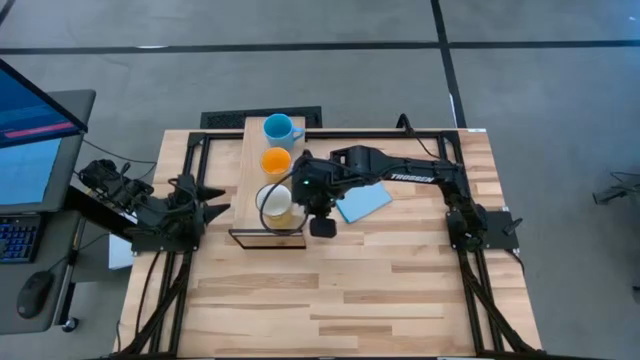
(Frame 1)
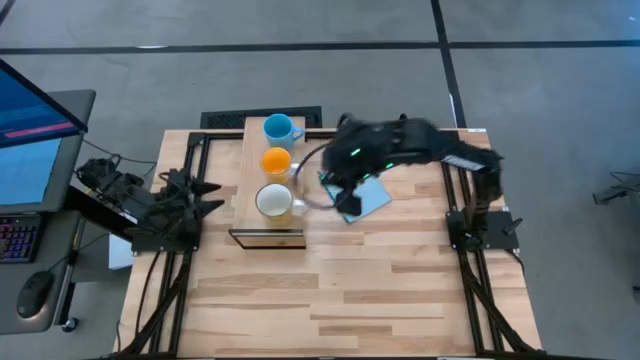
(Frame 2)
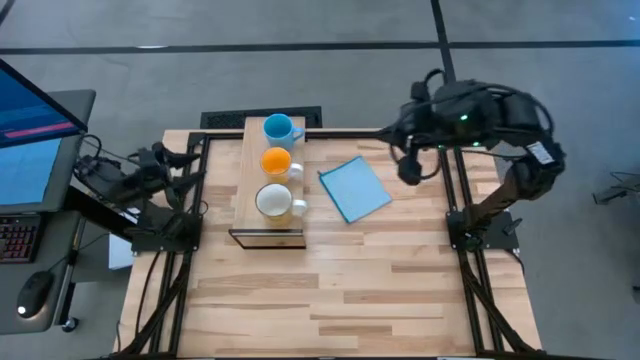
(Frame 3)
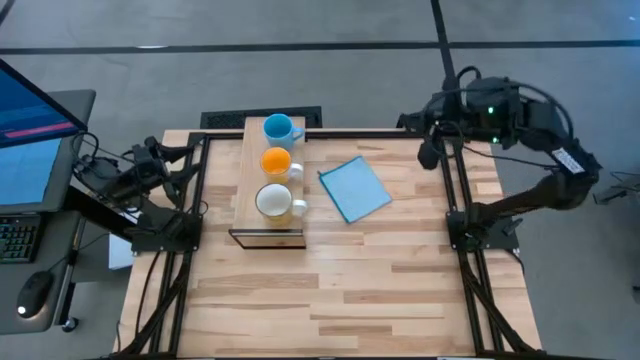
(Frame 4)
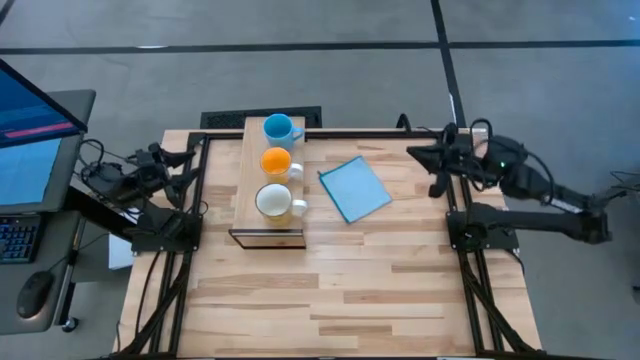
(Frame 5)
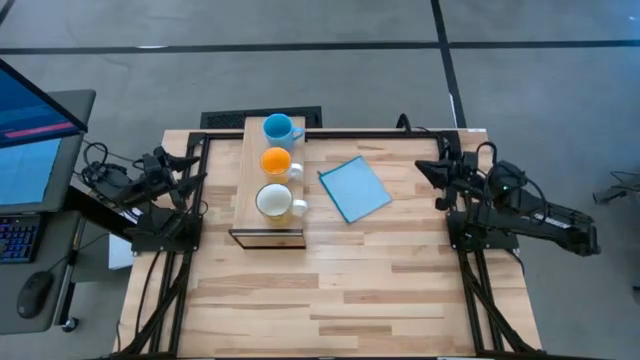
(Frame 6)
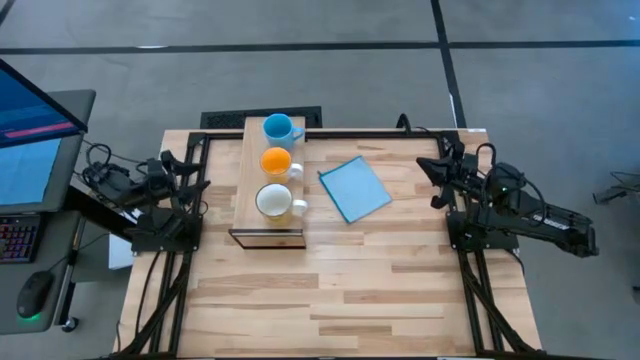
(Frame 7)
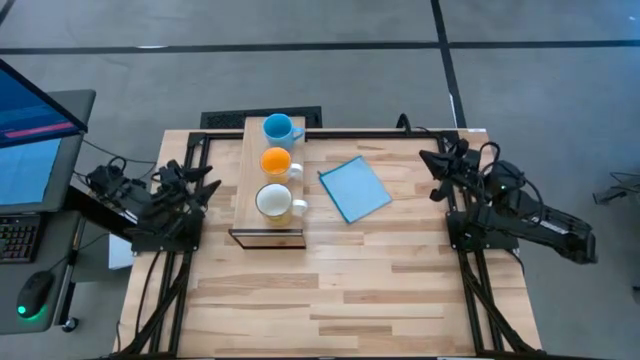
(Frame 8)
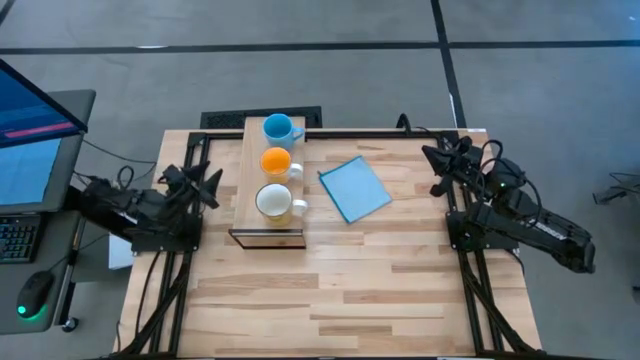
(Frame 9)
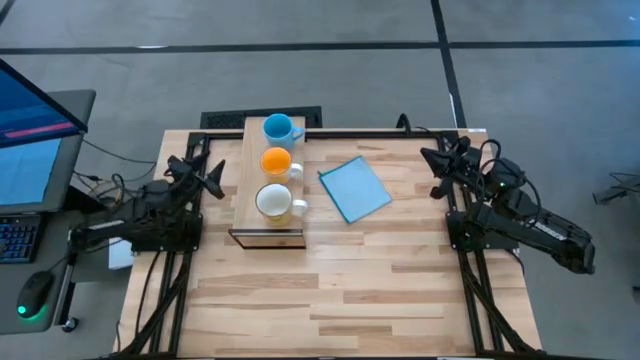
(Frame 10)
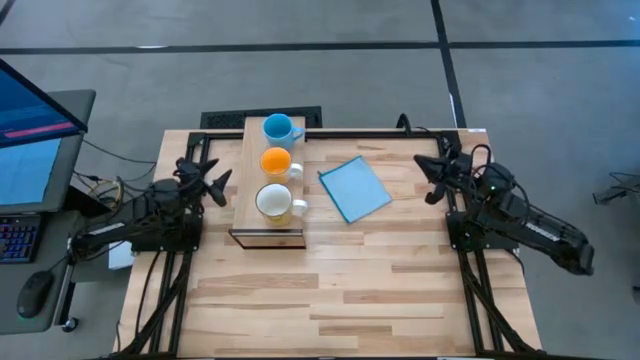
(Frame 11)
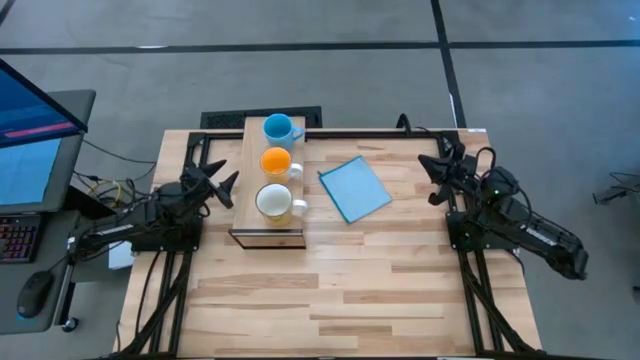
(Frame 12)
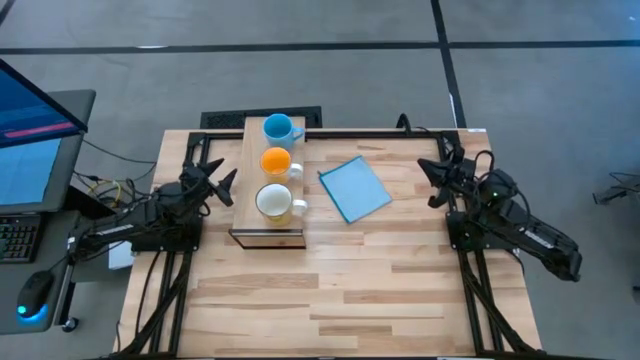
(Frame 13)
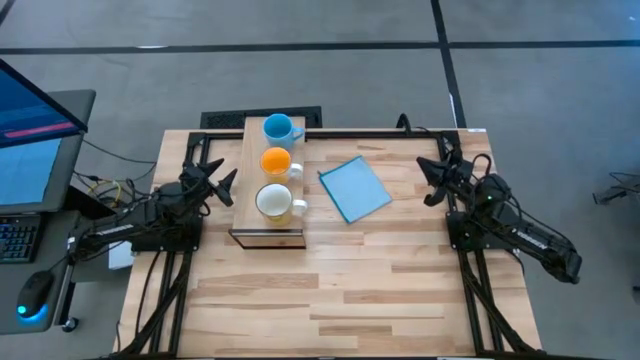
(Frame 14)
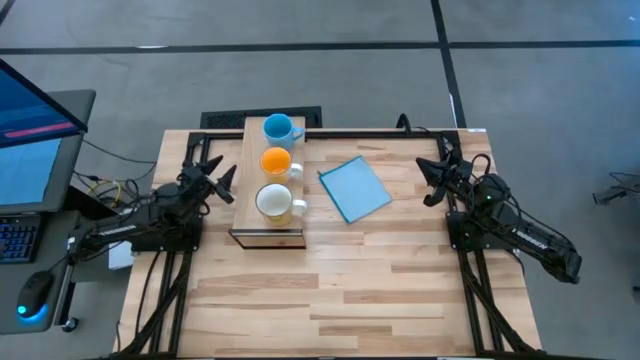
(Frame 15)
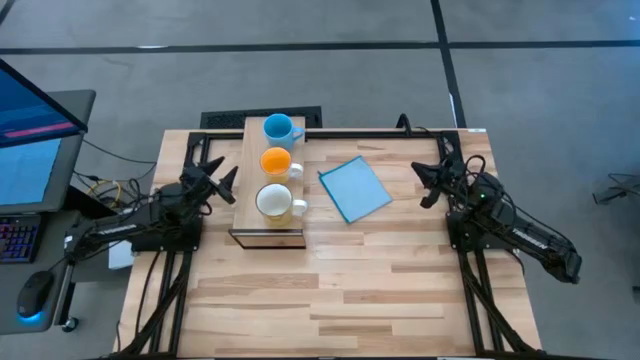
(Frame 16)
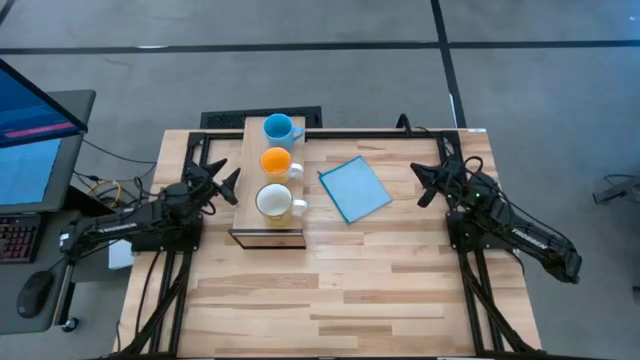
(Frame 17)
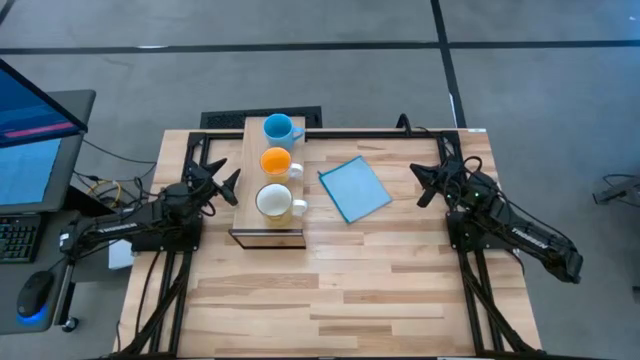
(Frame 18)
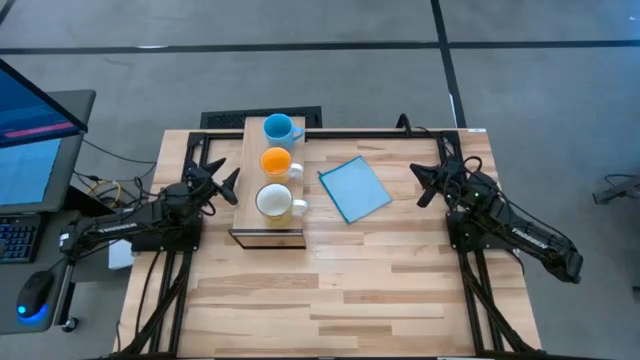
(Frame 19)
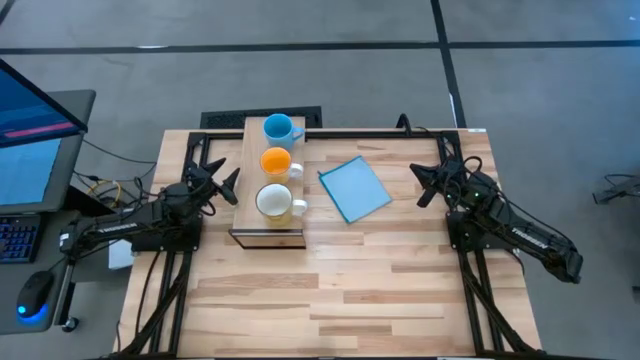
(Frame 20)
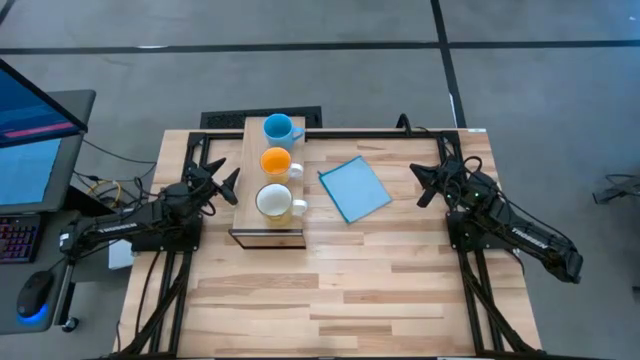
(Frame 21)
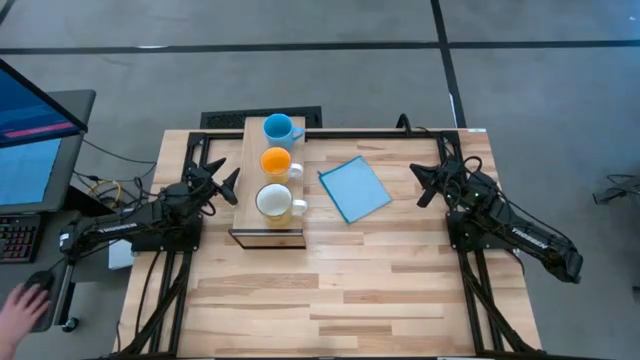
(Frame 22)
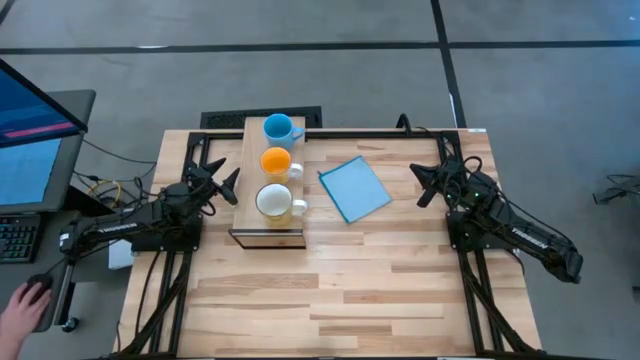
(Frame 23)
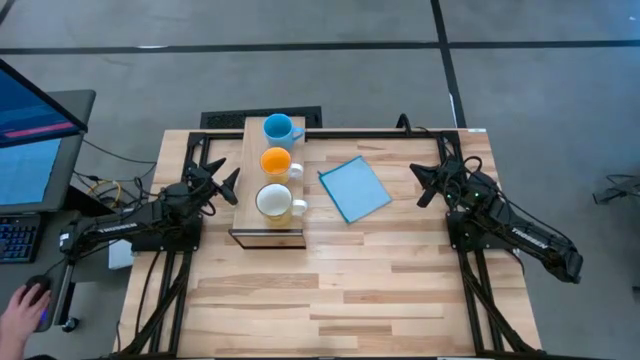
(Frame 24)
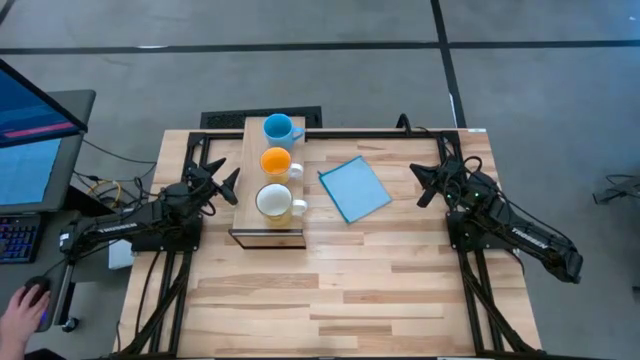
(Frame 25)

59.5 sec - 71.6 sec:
Task: Stack small to large cups/mugs on shelf
Return to Home Position

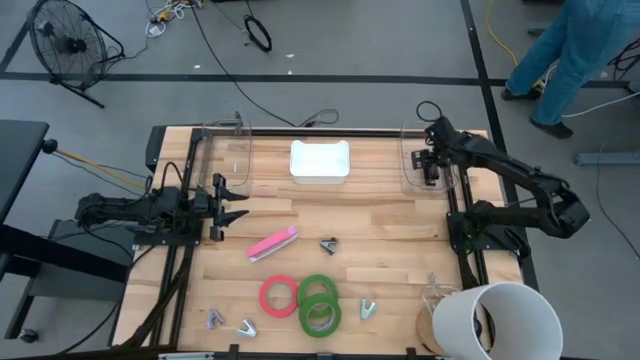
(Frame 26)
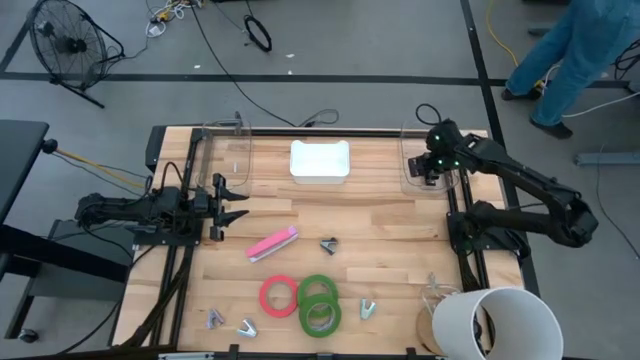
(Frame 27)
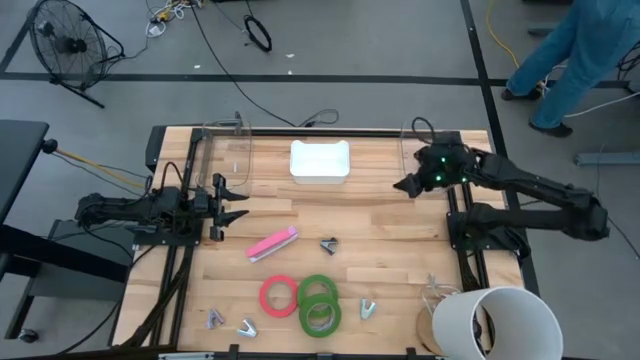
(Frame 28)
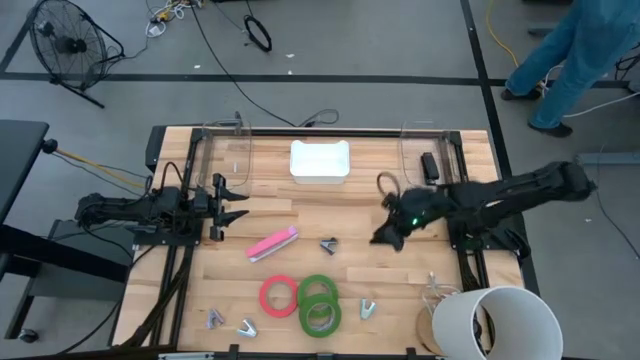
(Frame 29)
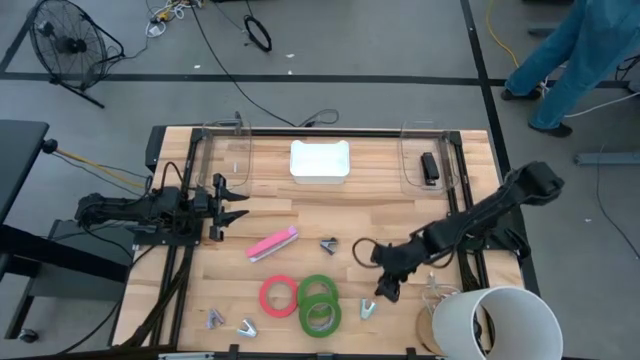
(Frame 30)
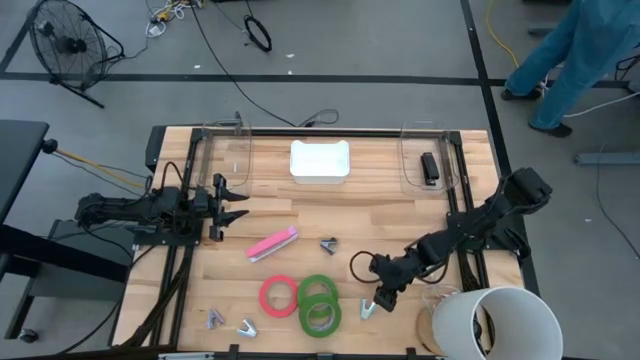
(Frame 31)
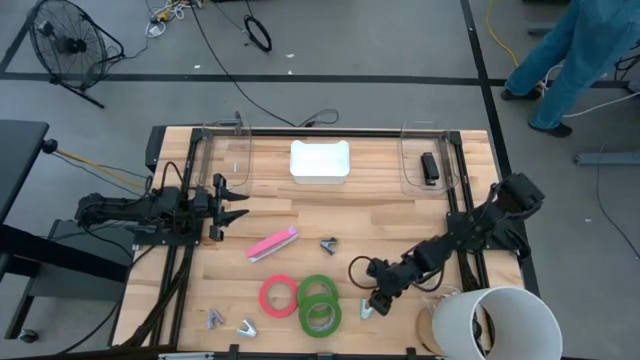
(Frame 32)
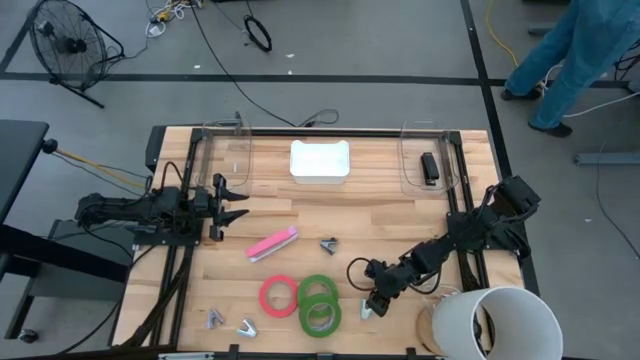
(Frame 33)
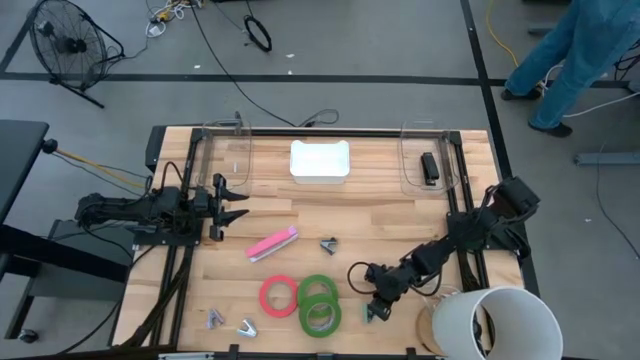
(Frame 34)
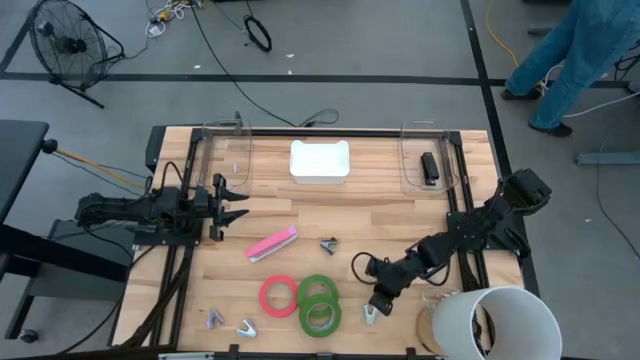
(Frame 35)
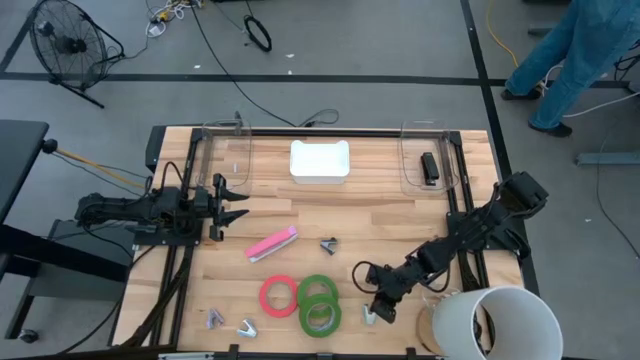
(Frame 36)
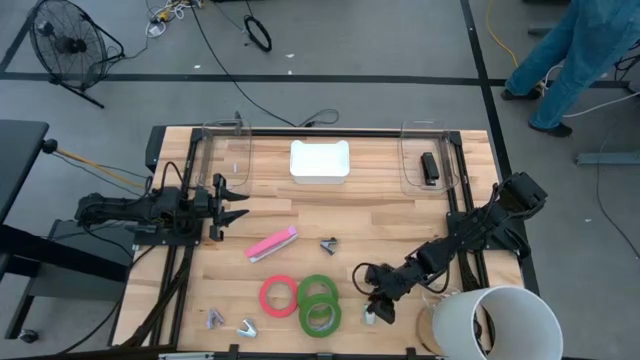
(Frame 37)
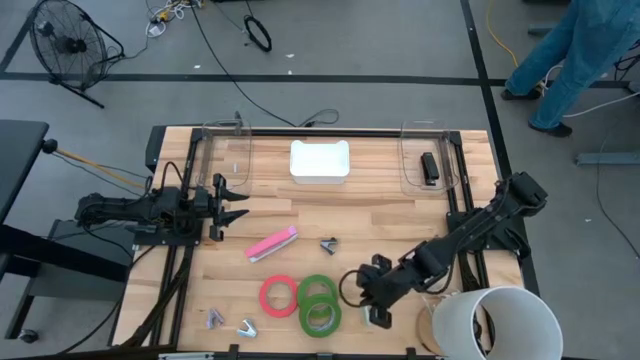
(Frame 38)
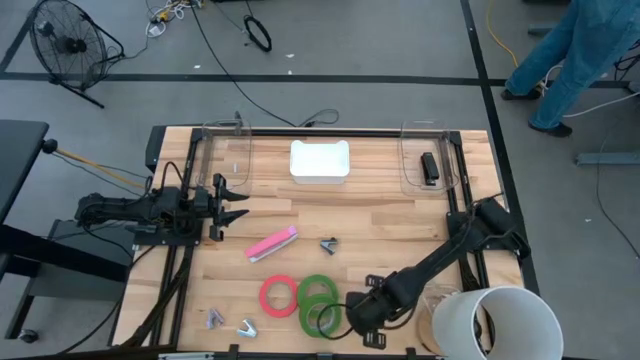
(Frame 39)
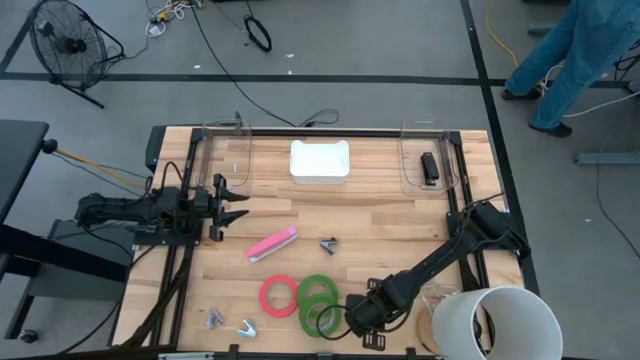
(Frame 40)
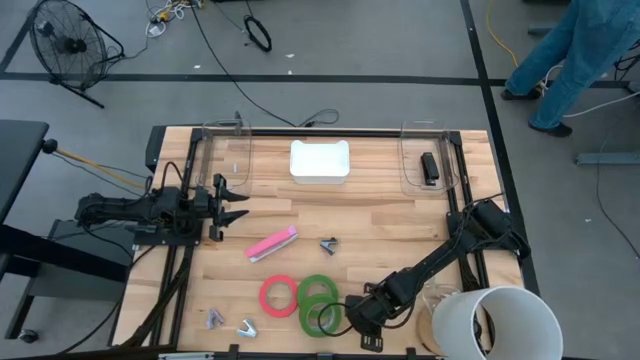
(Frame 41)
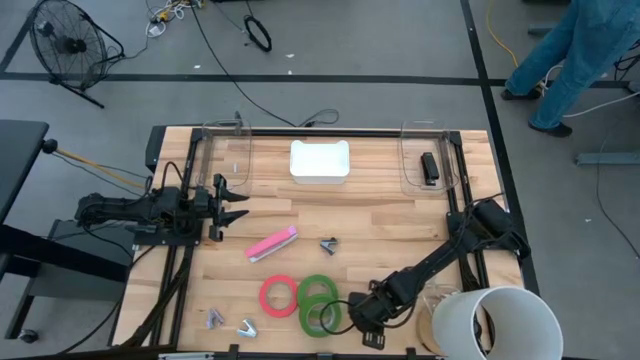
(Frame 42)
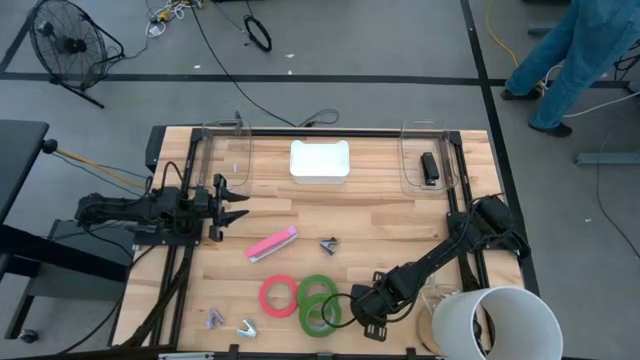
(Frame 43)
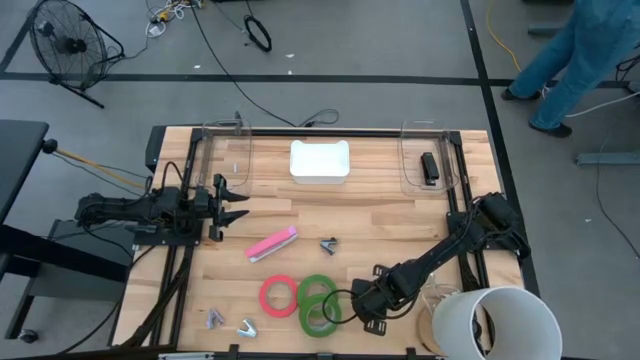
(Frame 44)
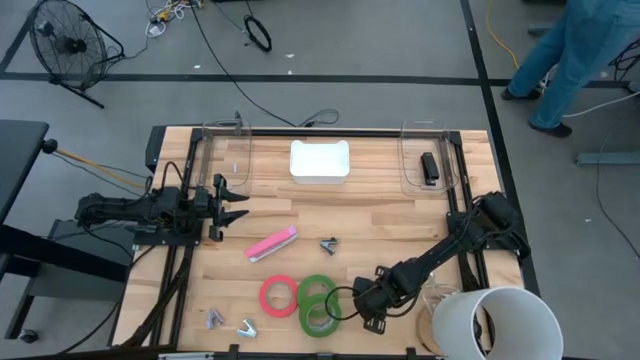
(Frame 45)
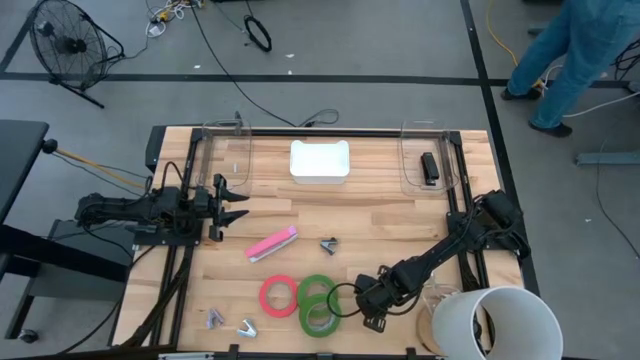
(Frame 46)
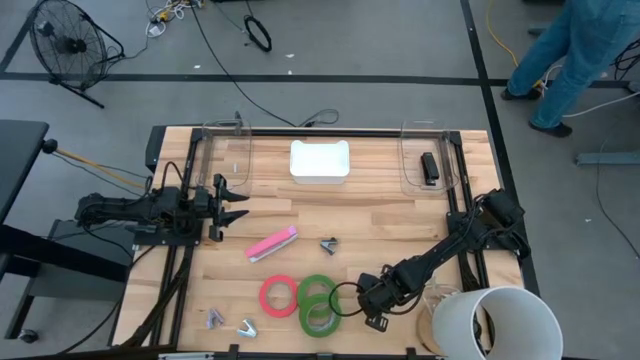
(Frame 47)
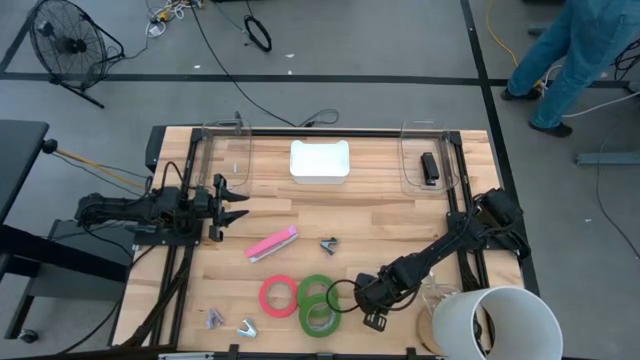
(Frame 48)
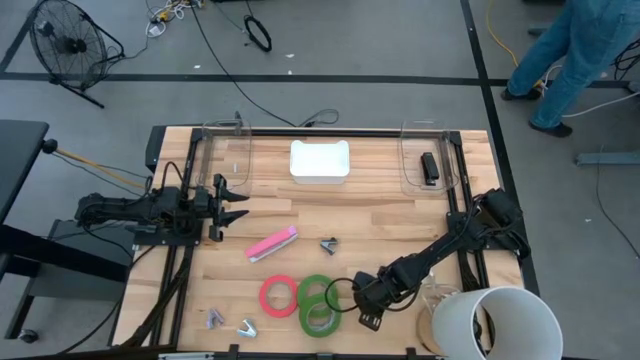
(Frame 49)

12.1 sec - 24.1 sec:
Task: Pick and place Stapler, Stapler remover, tape
Put the blue staple remover into the white bin
